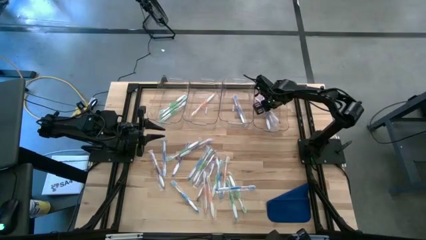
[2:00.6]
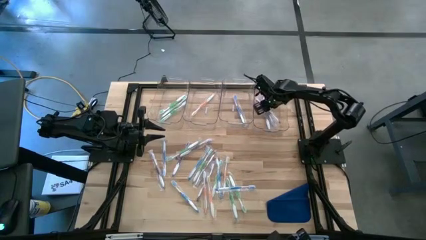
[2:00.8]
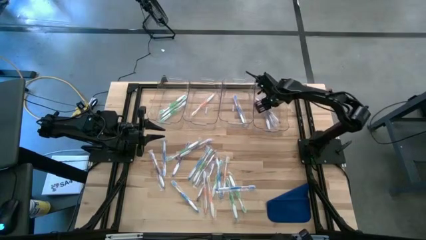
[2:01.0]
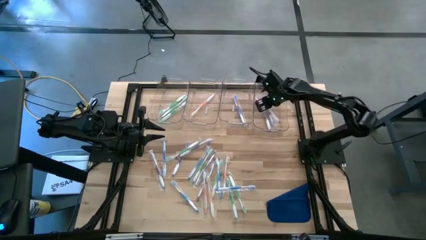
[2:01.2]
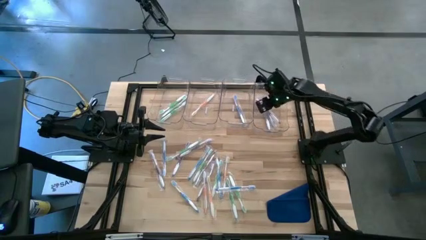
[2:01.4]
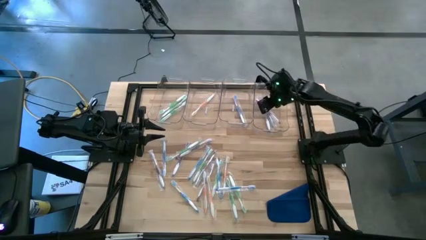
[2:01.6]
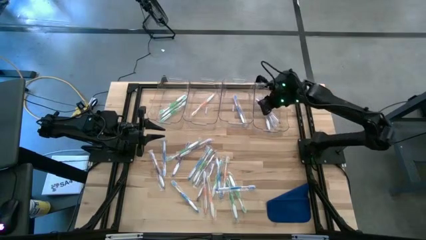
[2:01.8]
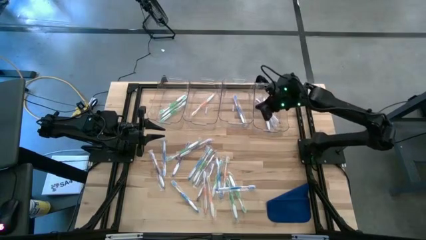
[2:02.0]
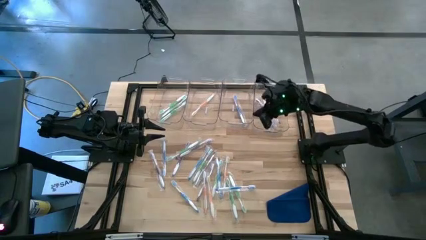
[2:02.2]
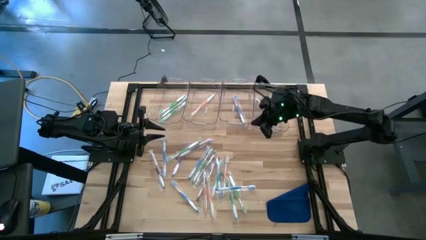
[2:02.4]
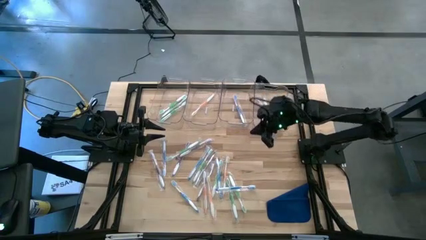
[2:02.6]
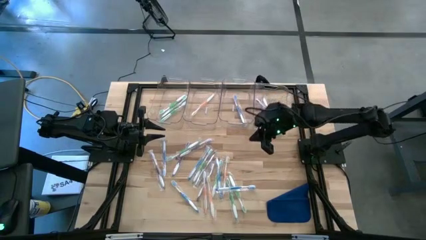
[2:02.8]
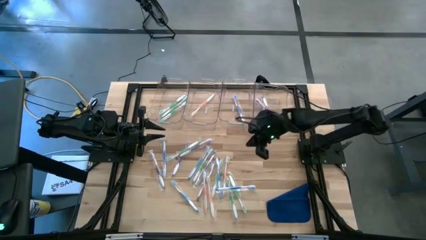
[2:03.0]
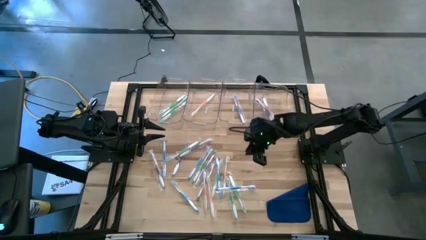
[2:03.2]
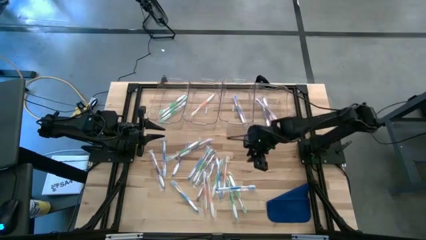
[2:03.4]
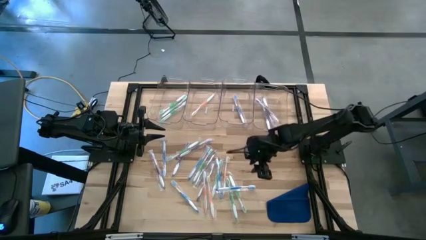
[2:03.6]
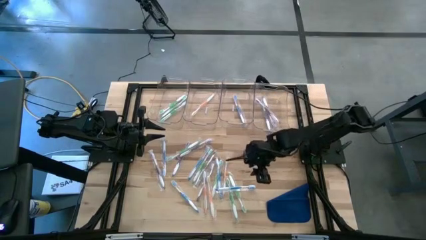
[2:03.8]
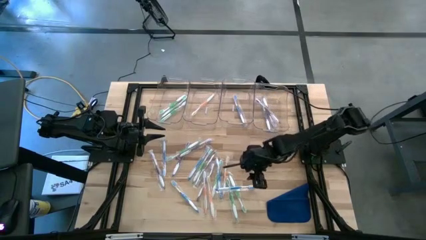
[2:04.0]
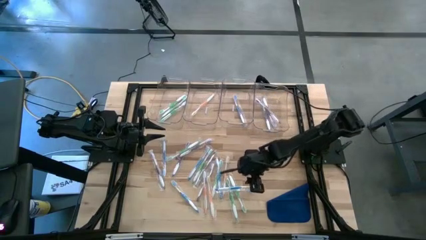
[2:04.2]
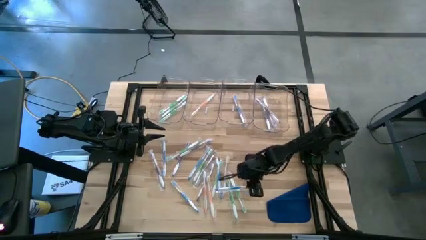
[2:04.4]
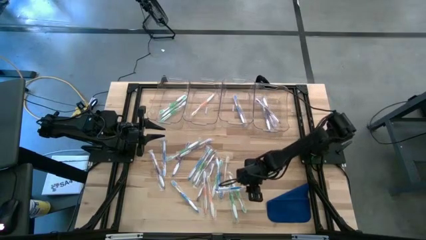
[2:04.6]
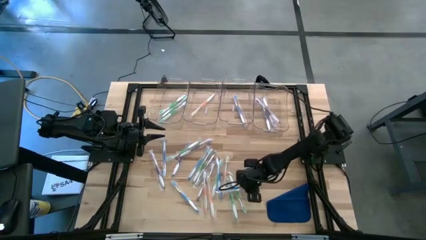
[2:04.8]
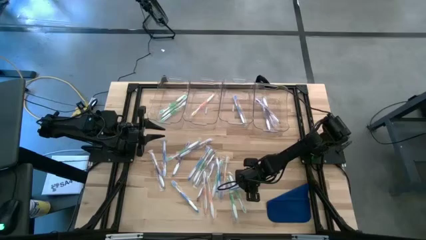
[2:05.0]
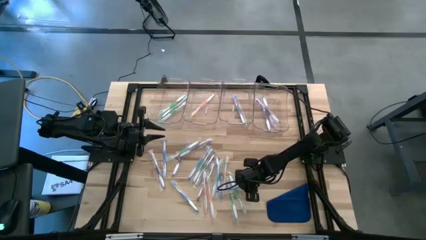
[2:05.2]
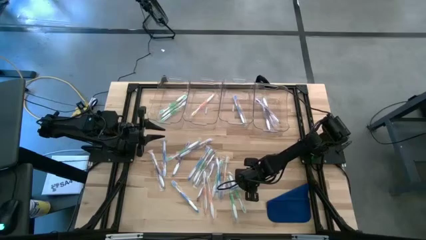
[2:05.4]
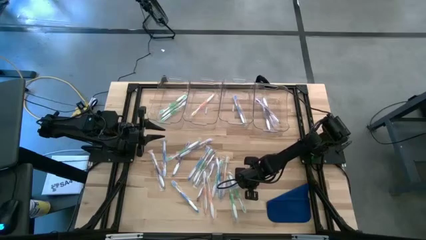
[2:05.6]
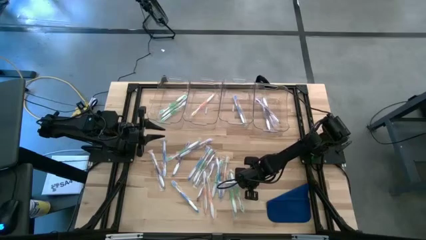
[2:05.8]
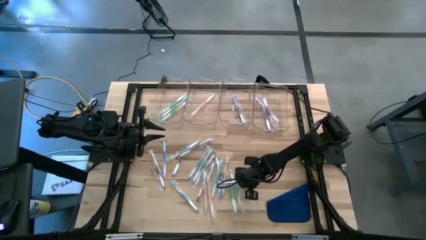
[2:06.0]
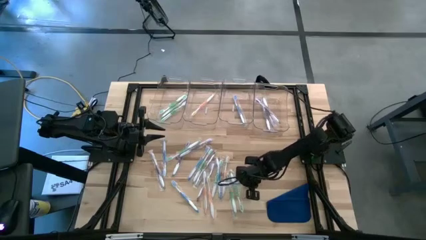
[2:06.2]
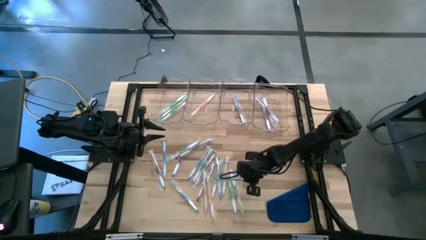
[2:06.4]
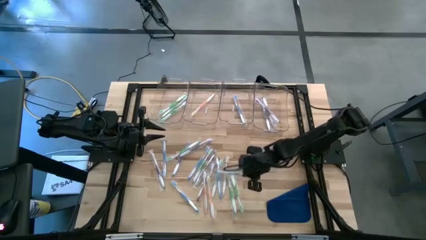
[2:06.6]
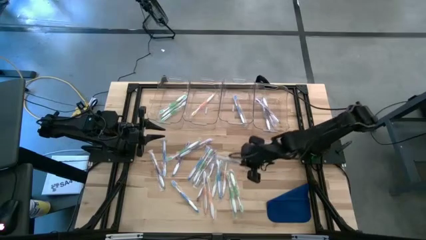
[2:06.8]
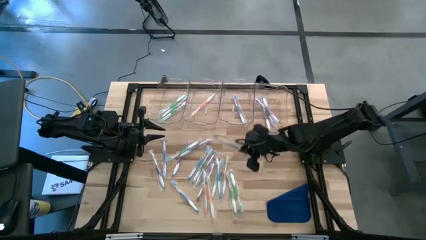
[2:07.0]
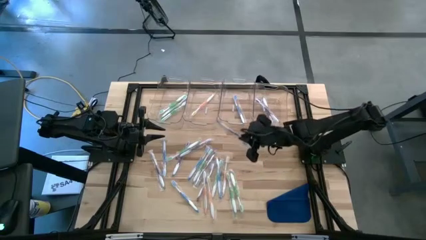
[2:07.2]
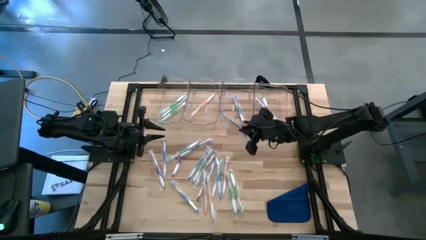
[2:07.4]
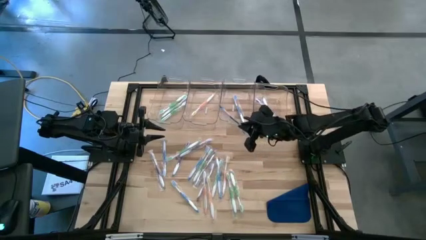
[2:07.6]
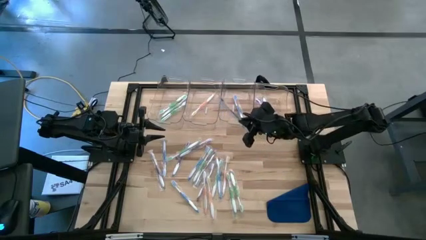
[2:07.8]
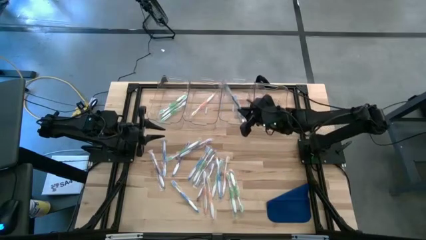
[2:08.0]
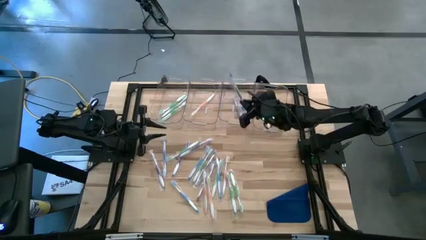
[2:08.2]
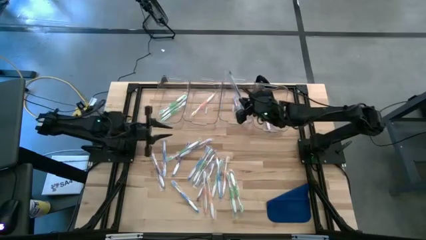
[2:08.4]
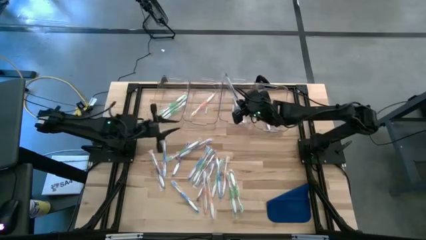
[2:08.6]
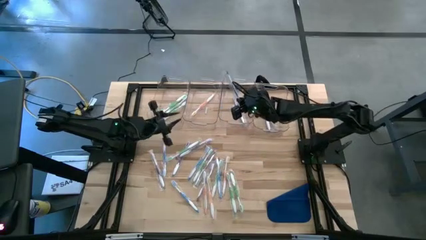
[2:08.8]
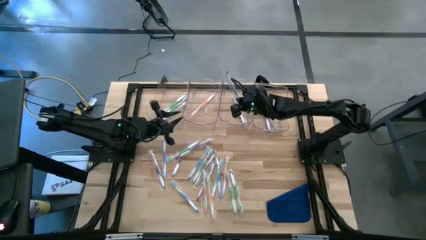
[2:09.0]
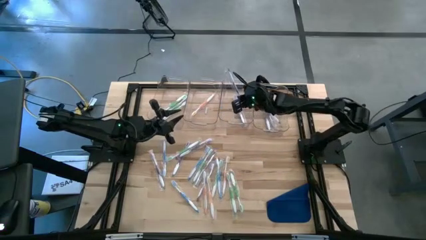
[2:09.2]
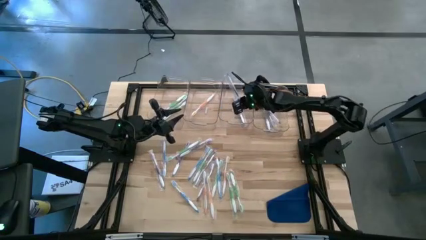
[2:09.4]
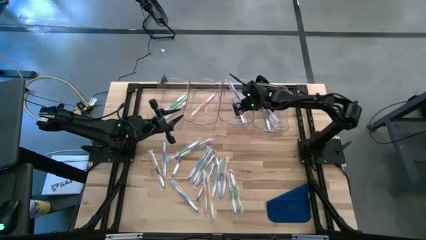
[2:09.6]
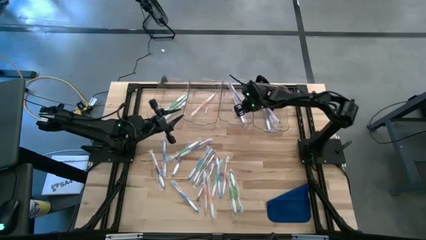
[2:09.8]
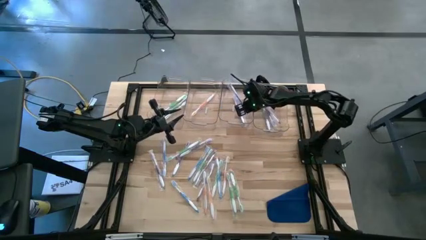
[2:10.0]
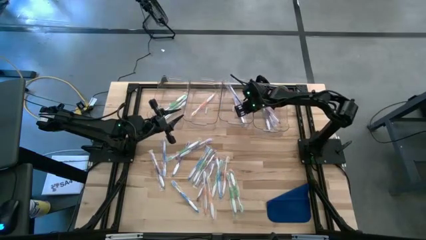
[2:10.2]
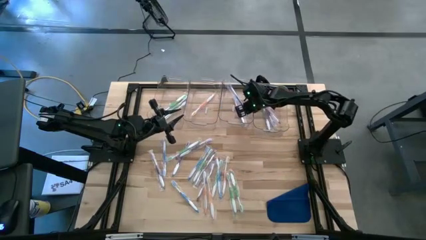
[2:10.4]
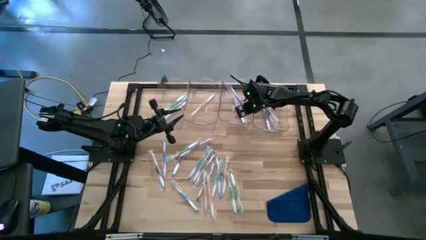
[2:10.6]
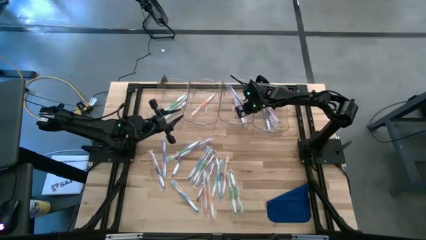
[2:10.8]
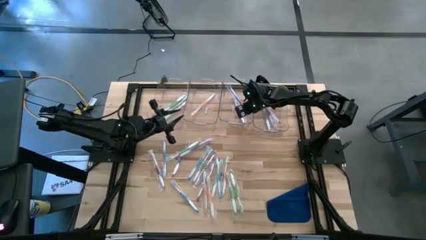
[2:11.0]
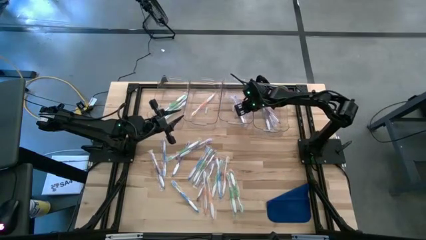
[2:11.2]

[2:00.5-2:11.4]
Task: Pick & Place Toothbrushes
Put the blue toothbrush into the middle right transparent bin

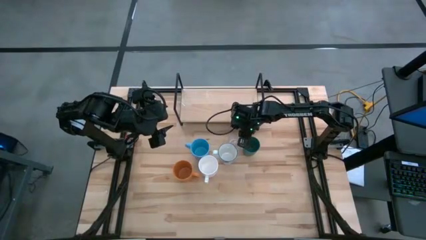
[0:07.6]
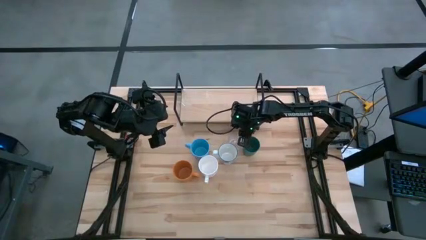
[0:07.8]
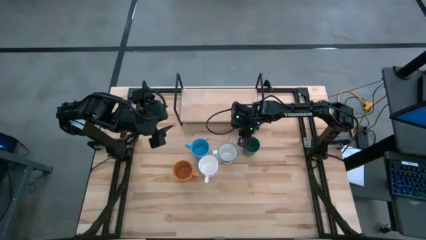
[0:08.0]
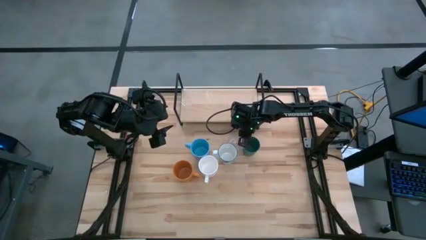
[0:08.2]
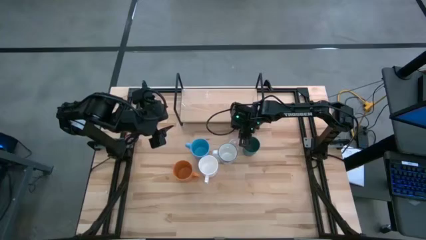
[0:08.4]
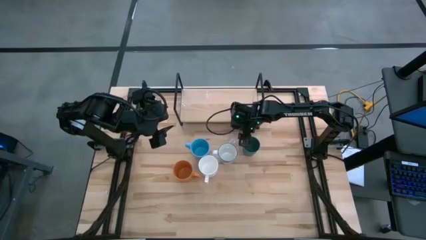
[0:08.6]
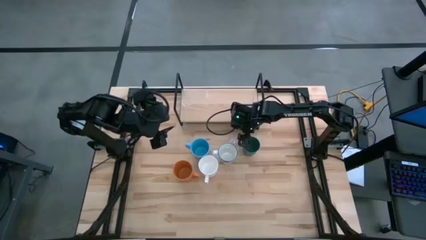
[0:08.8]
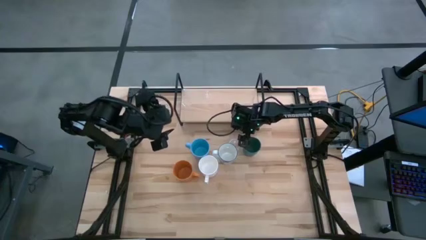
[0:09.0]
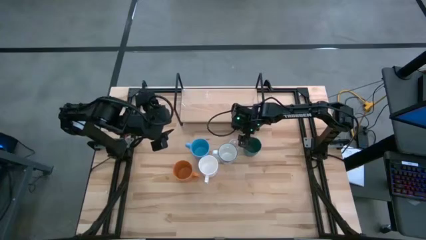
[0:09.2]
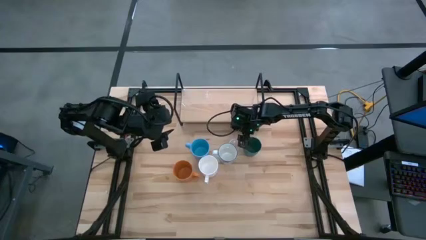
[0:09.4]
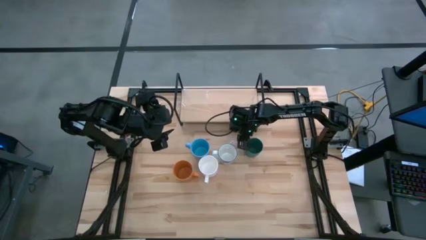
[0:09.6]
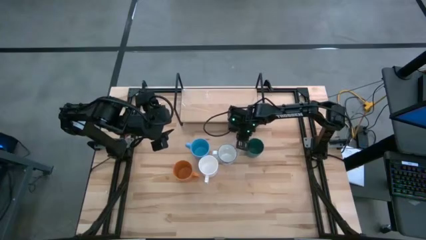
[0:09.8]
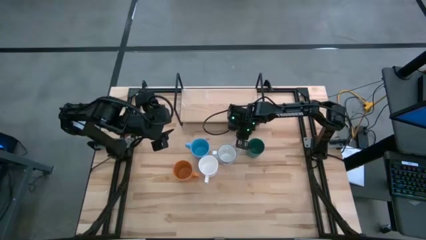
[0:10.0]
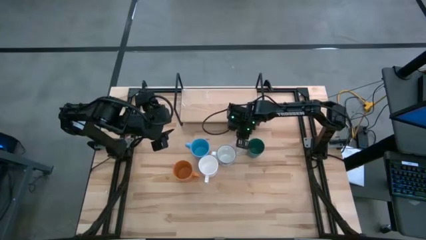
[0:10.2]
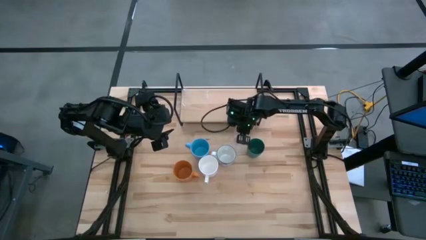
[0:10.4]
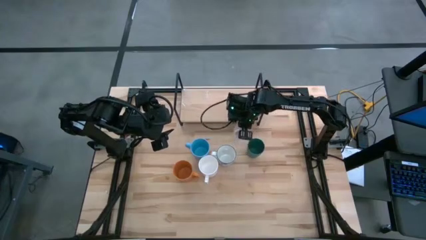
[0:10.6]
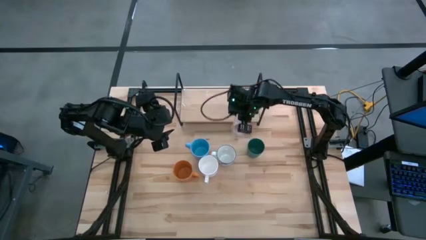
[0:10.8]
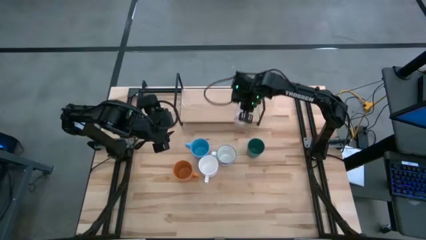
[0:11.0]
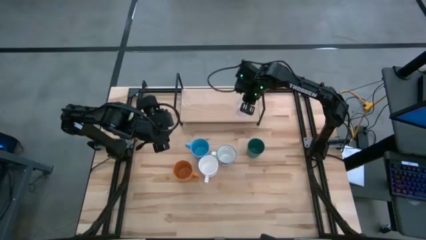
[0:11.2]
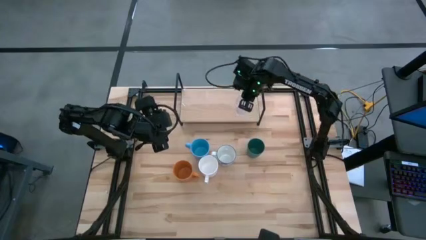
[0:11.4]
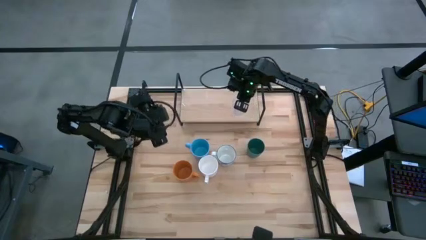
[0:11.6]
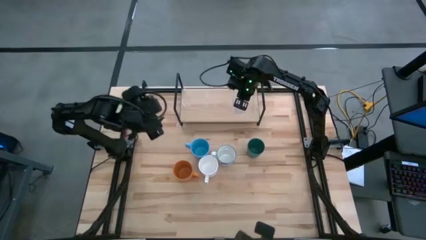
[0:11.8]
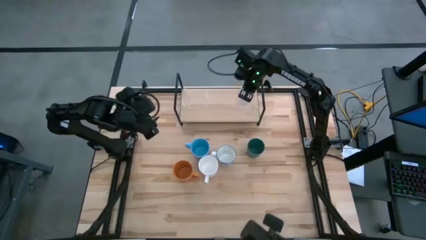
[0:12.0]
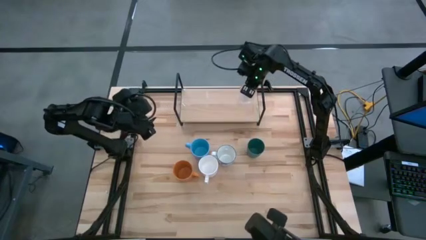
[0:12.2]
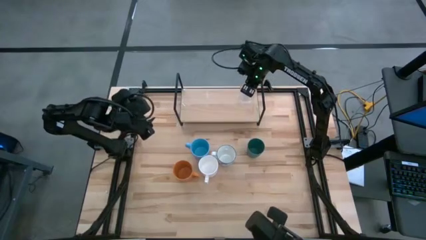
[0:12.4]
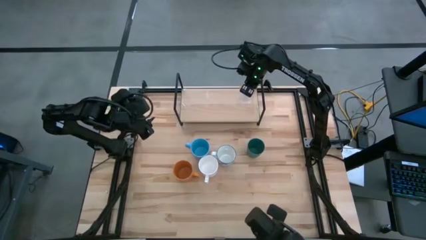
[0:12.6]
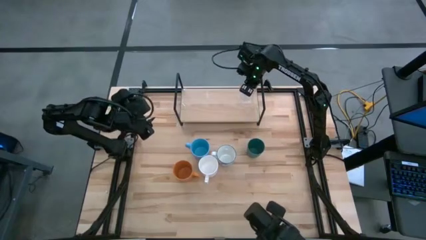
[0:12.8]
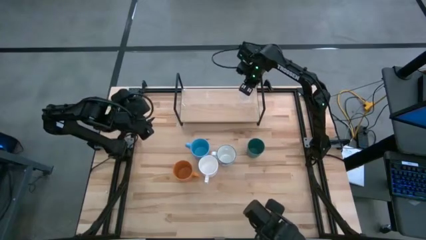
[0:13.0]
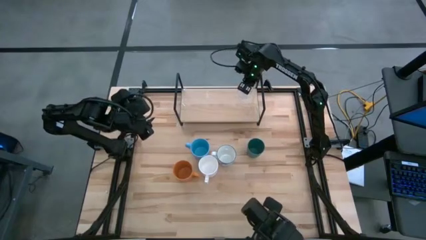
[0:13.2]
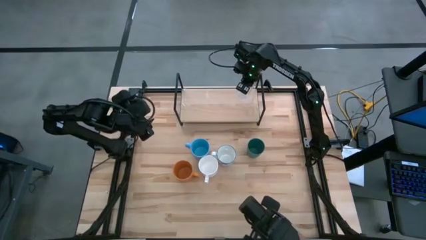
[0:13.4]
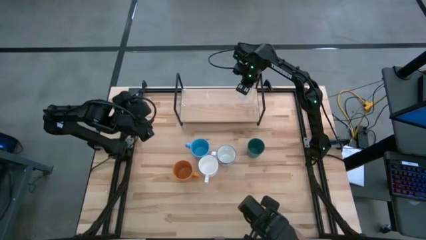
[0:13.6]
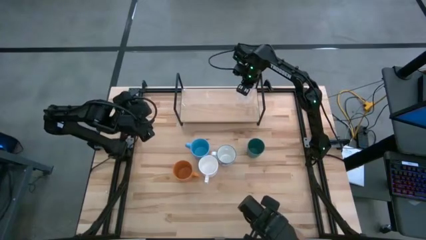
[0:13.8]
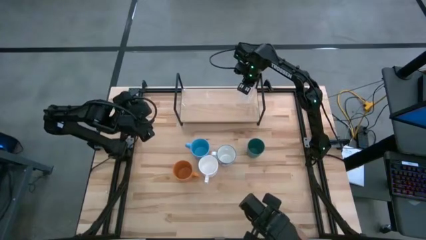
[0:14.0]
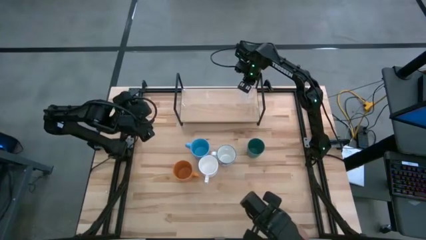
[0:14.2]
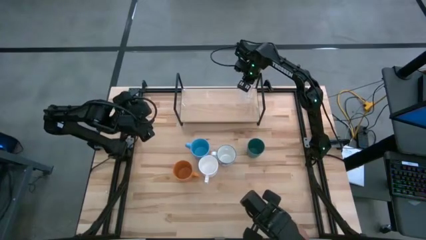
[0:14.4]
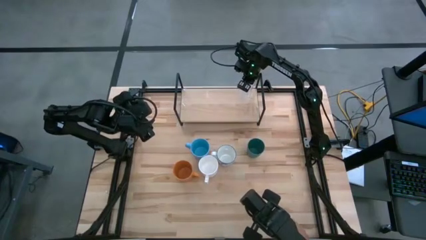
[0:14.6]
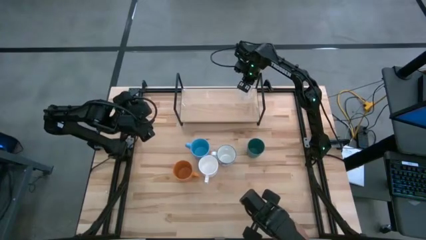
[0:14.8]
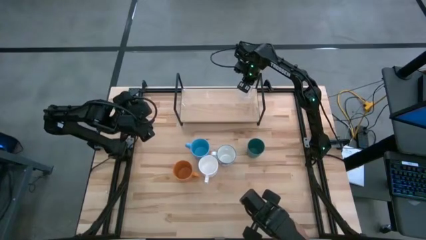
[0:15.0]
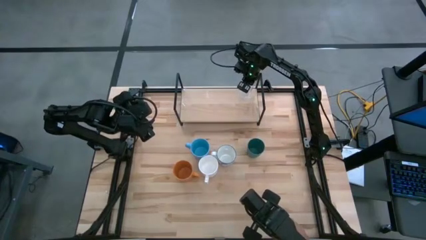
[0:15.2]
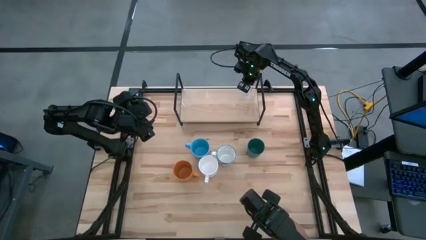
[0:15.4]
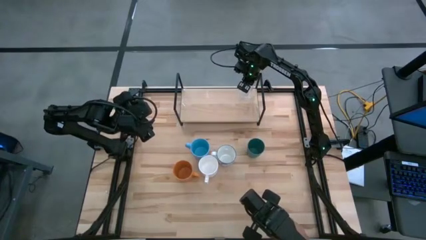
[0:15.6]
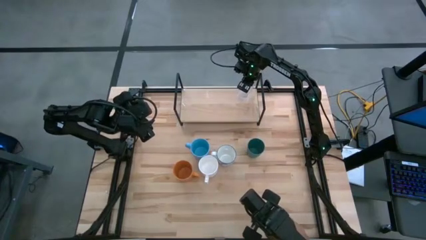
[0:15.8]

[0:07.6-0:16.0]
Task: Stack small to large cups/mugs on shelf
Put the transparent mug on the shelf
